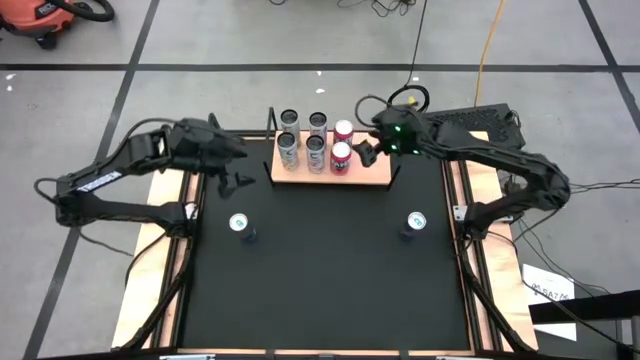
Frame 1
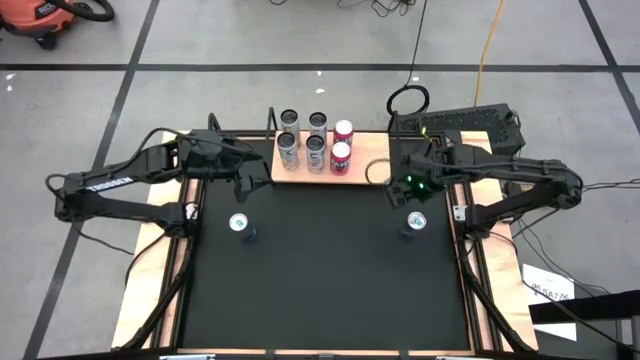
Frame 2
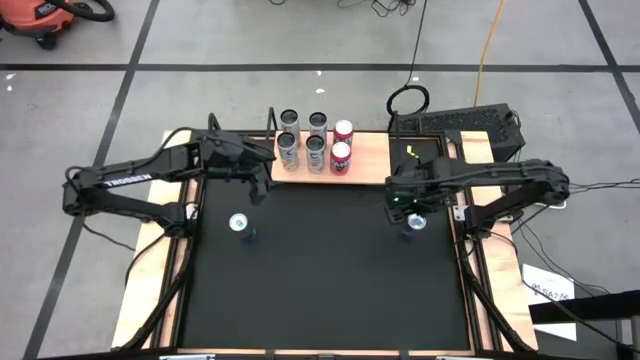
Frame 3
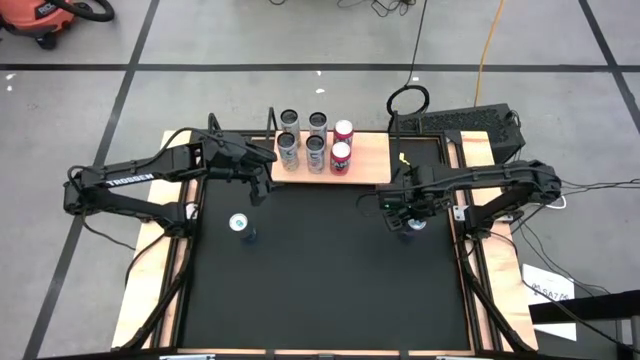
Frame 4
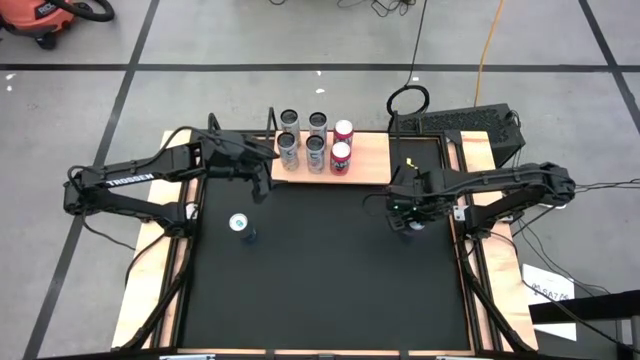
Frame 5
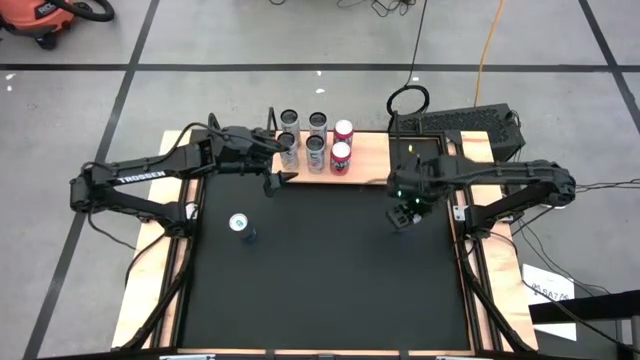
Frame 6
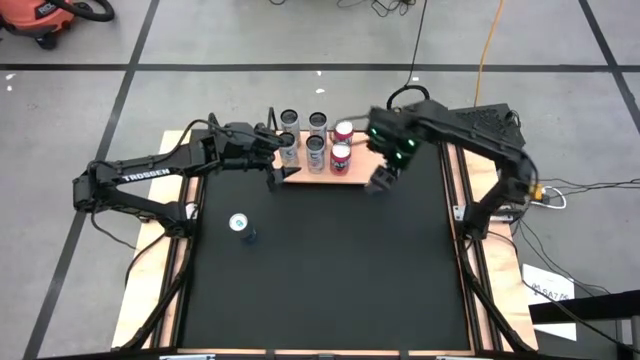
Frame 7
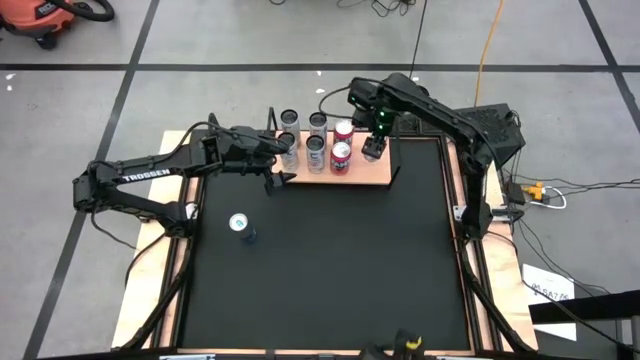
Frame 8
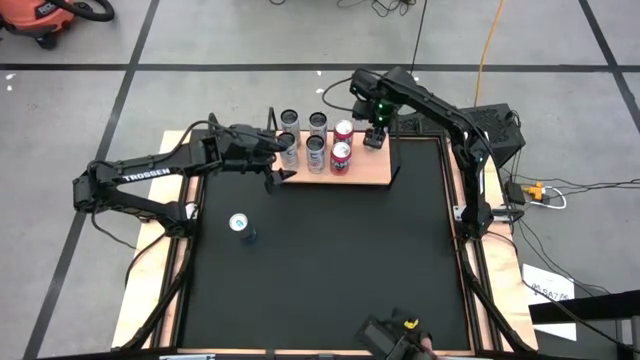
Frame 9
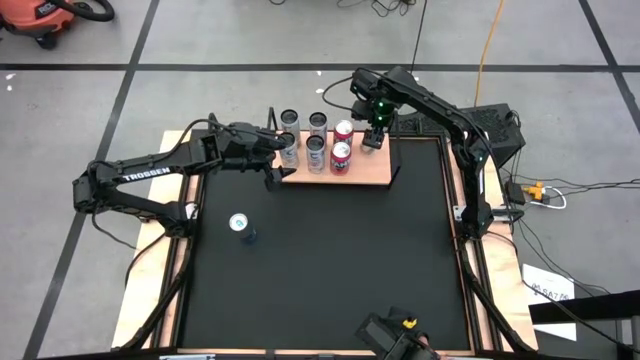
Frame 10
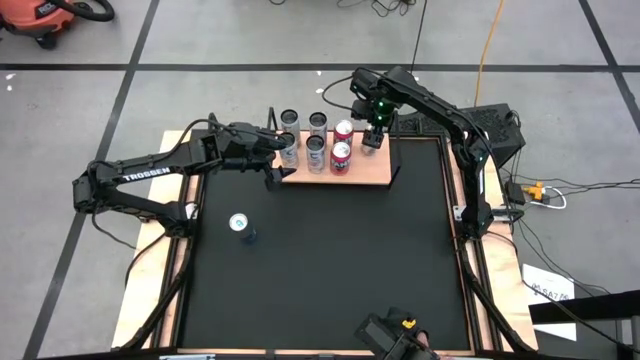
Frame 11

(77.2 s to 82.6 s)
Task: Place canned beverage on shelf
Put the right blue soda can on the shelf

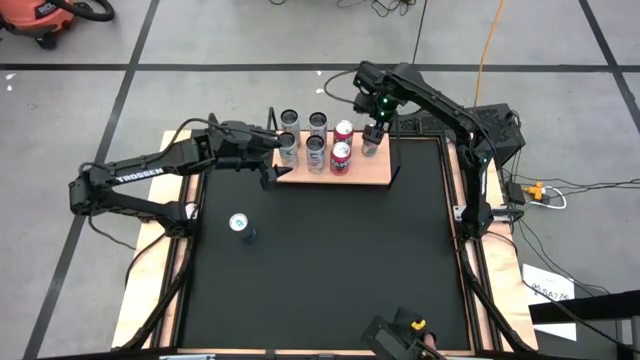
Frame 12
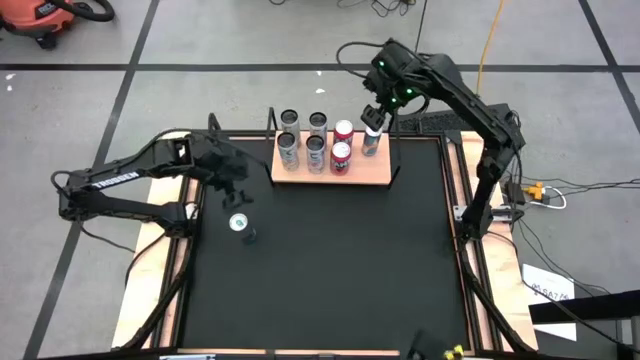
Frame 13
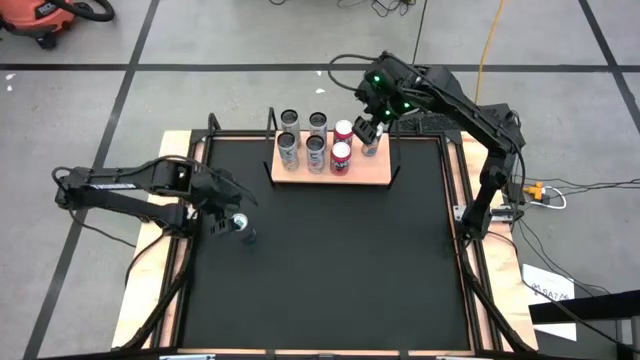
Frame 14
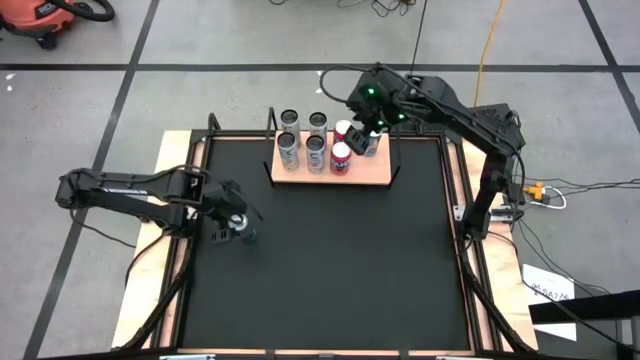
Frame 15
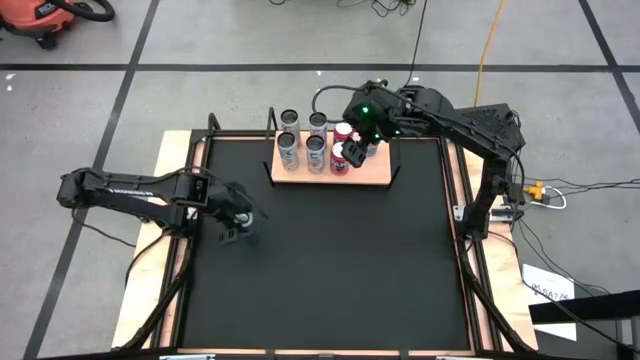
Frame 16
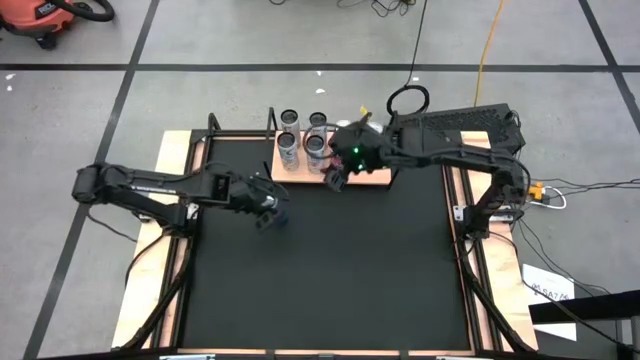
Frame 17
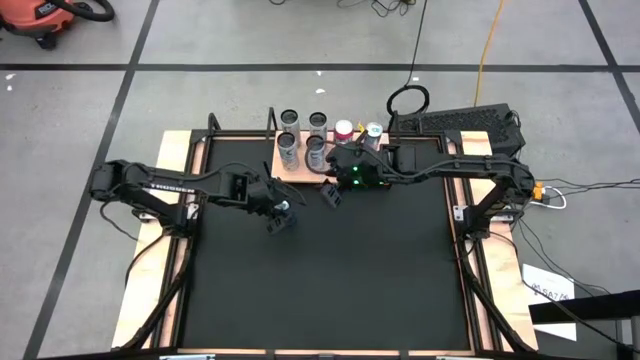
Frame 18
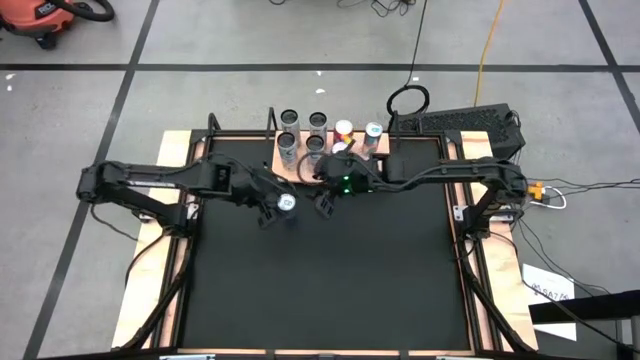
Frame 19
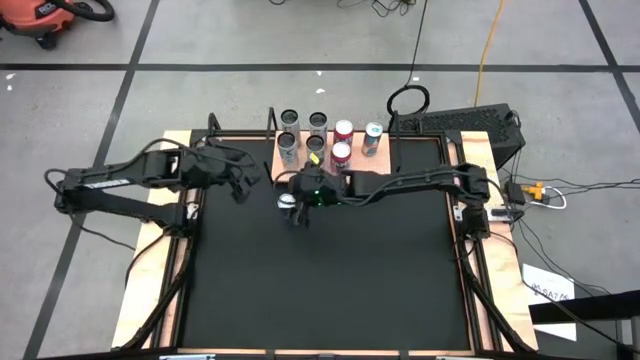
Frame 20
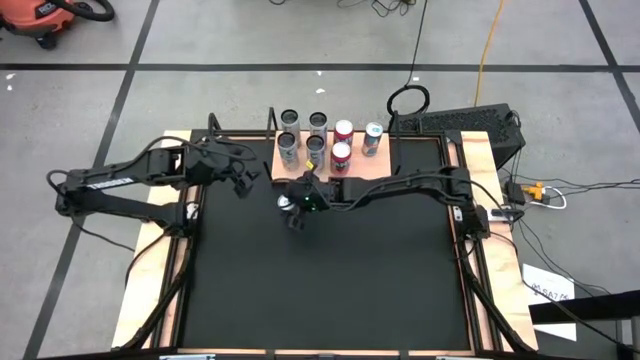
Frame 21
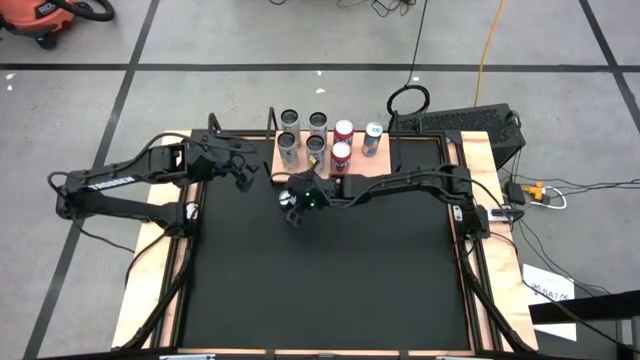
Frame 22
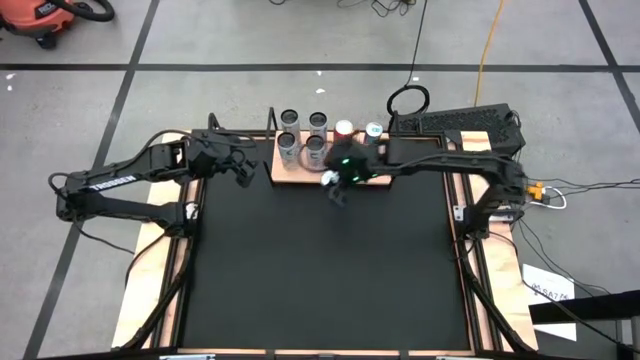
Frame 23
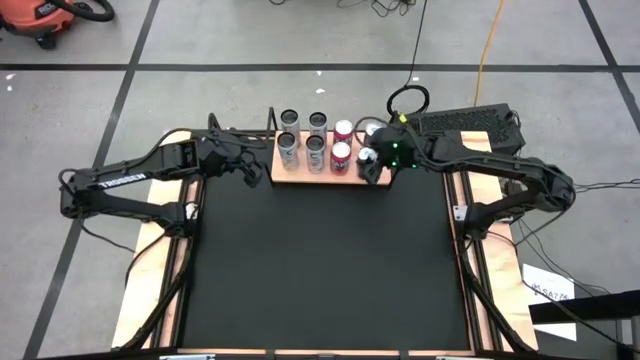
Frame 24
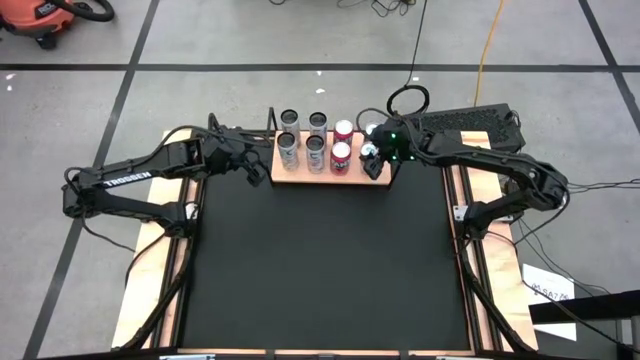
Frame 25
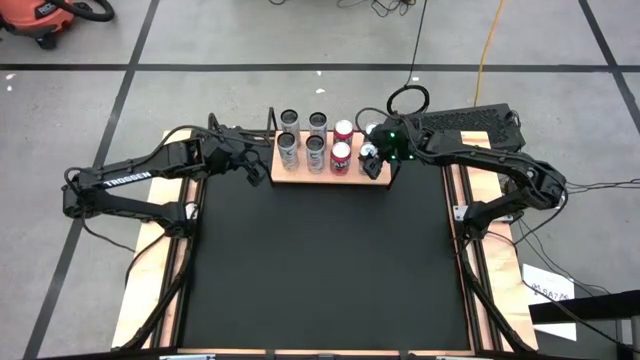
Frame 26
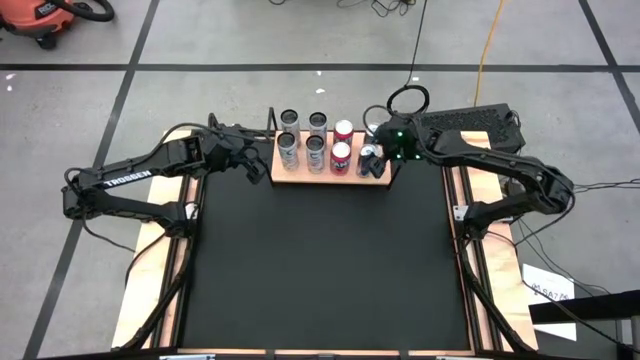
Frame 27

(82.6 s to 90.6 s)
Put the blue soda can on the shelf aligned with the other blue soda can

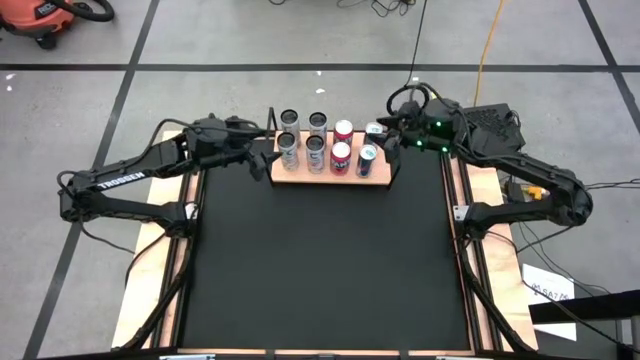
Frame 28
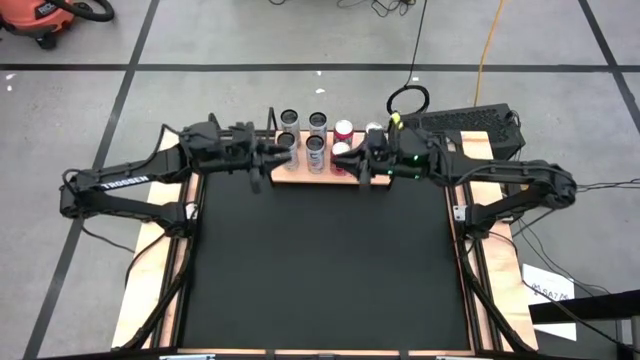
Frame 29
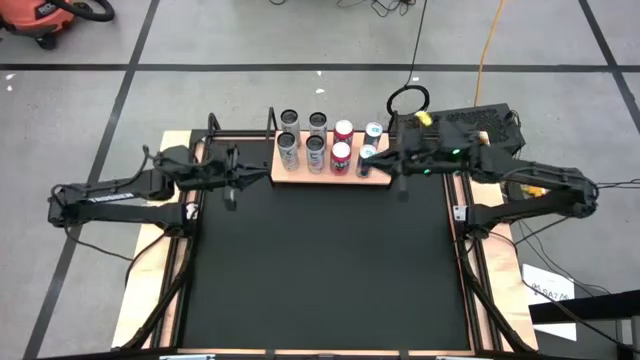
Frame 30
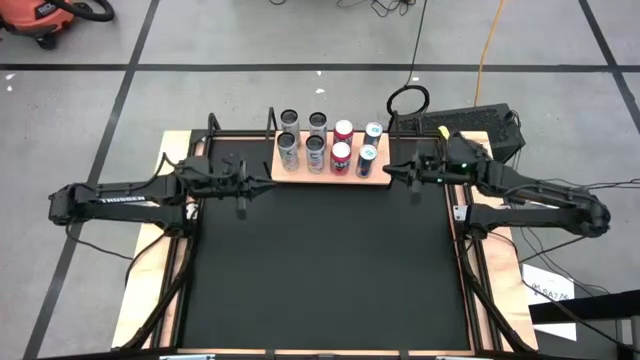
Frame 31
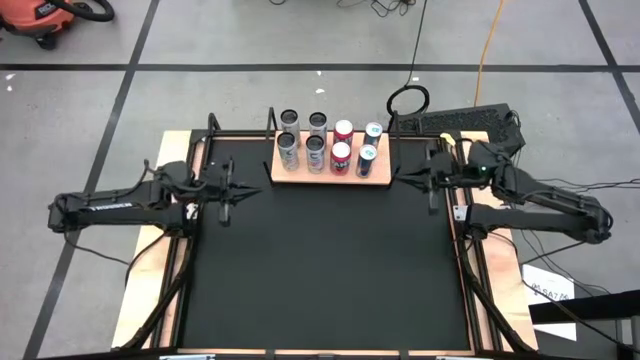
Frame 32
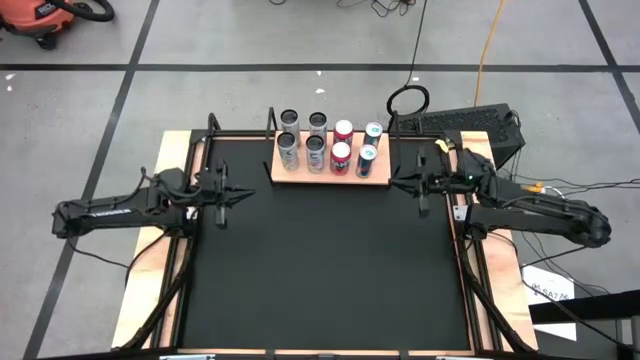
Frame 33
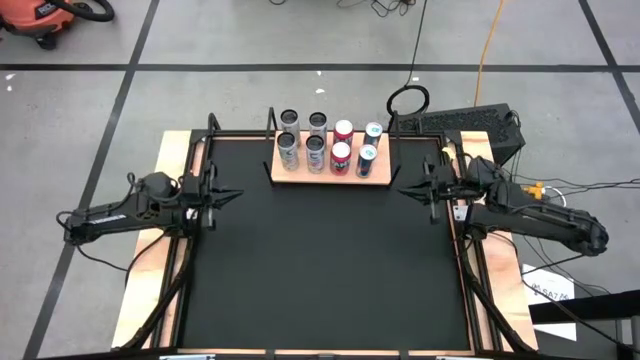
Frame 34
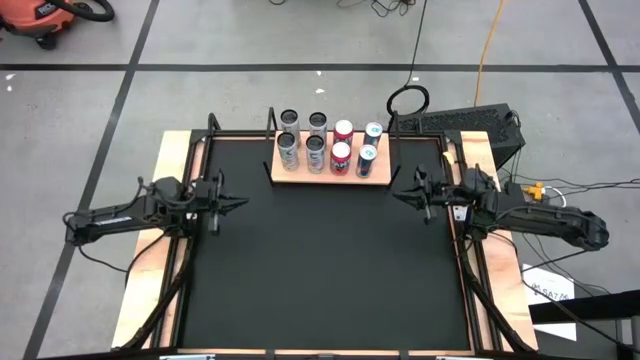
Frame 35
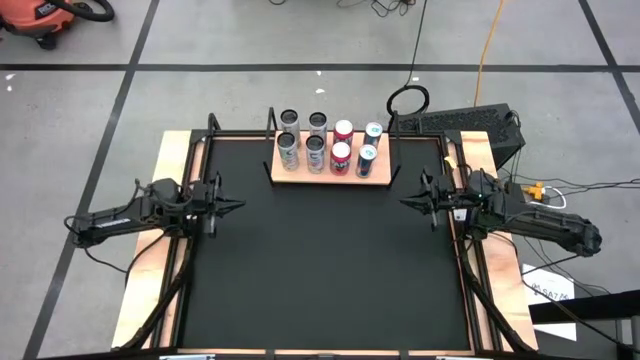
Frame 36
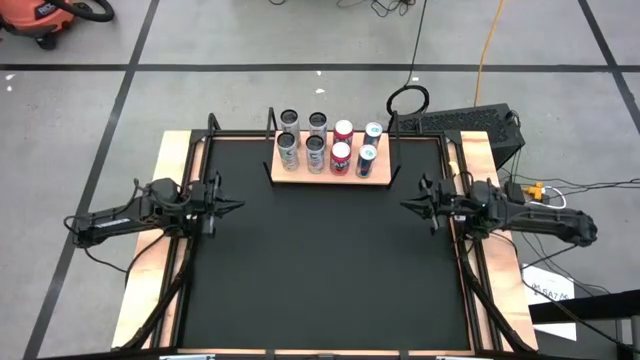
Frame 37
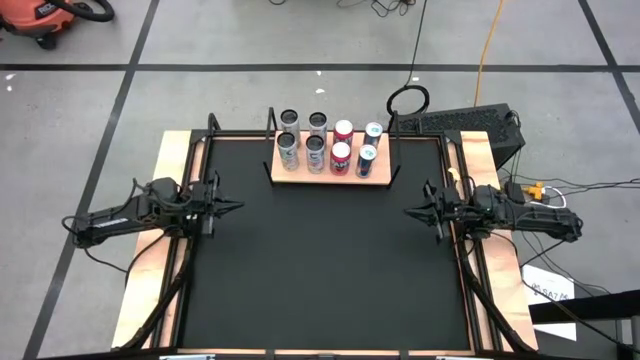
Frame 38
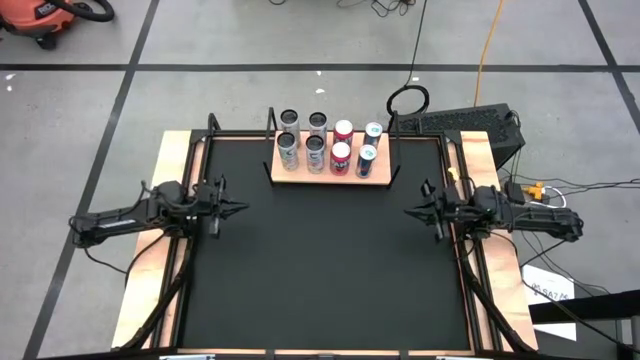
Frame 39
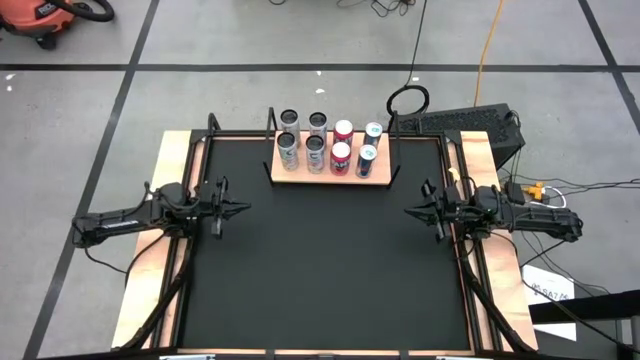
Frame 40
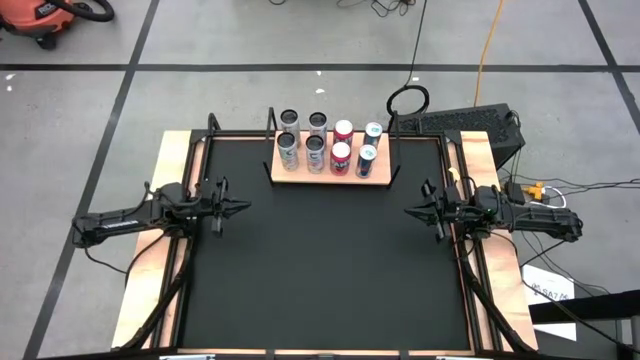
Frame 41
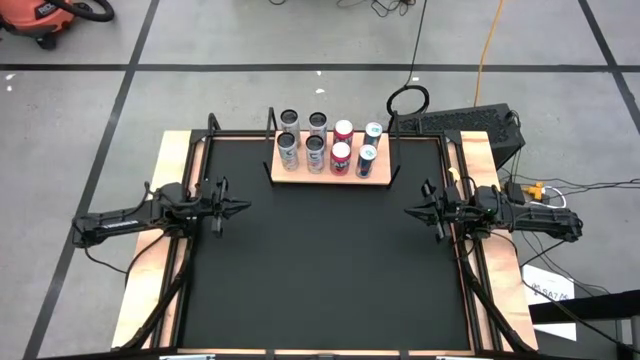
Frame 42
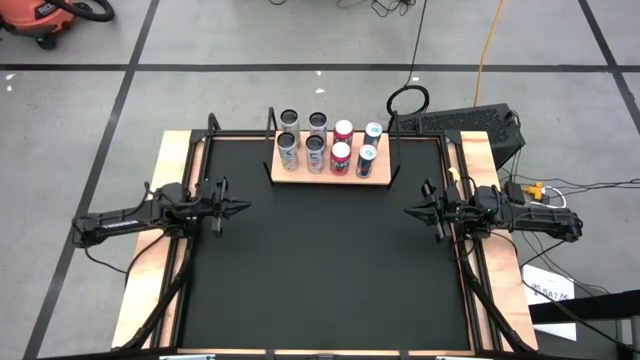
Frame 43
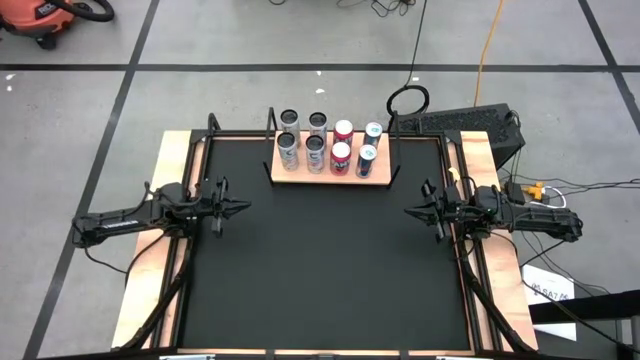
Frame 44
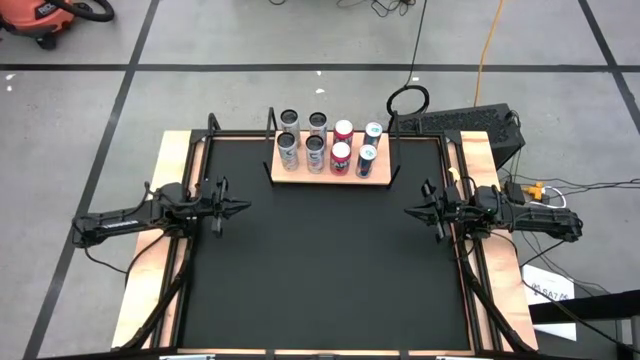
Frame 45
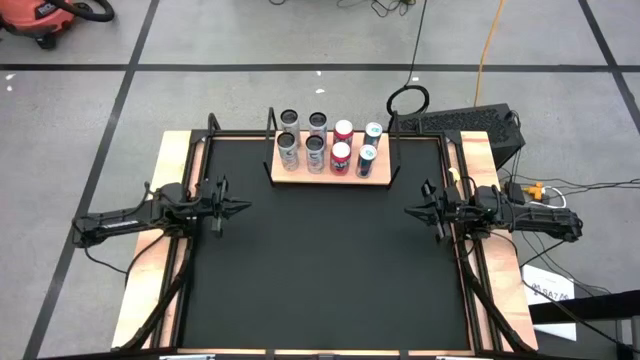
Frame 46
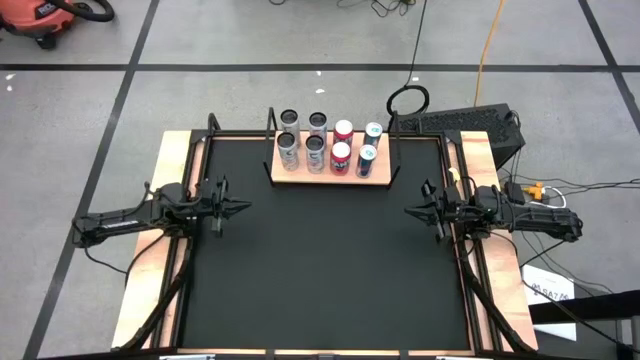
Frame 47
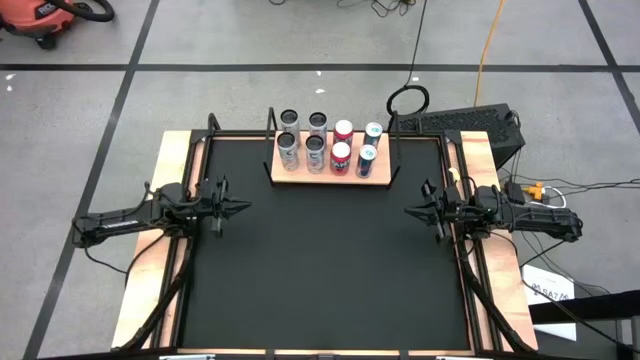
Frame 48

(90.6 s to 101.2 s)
Return to Home Position
